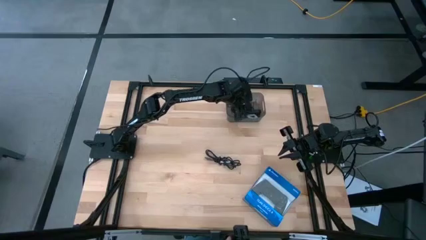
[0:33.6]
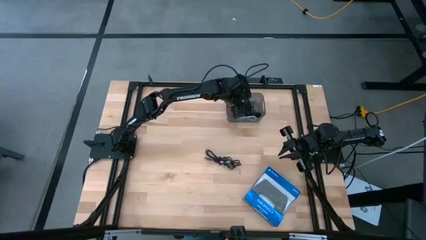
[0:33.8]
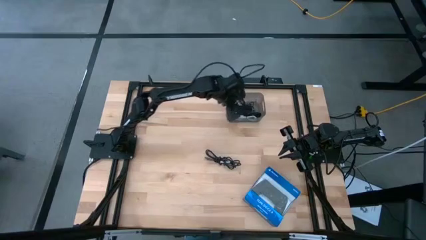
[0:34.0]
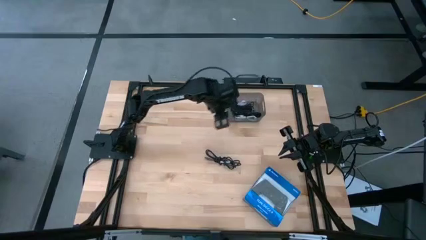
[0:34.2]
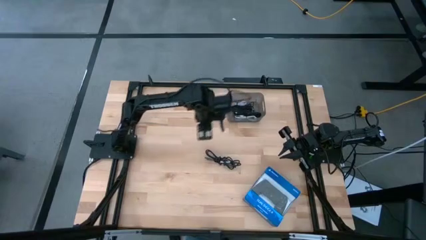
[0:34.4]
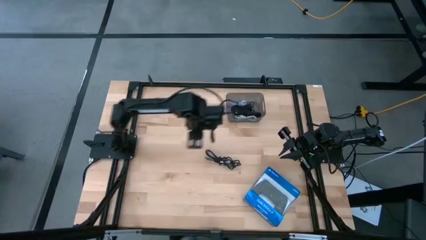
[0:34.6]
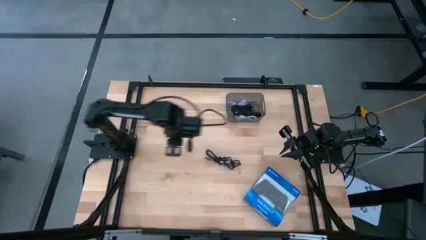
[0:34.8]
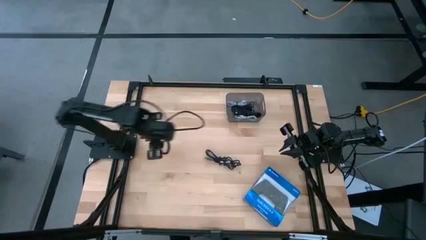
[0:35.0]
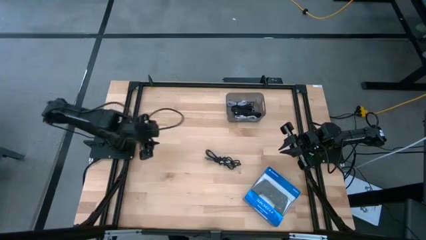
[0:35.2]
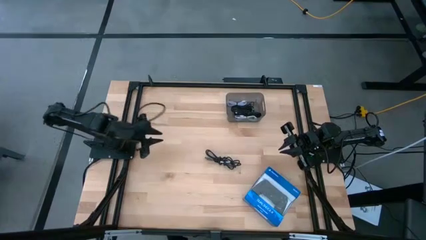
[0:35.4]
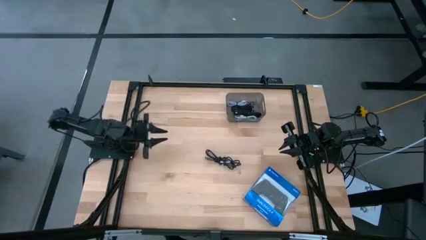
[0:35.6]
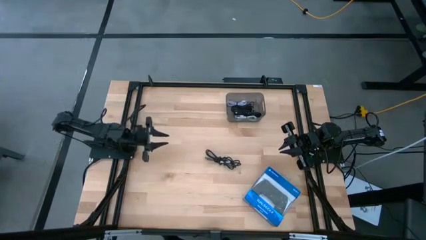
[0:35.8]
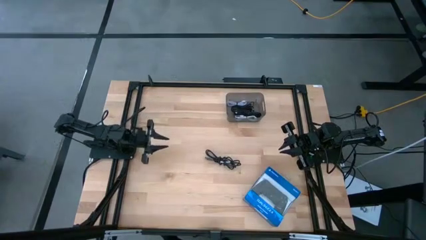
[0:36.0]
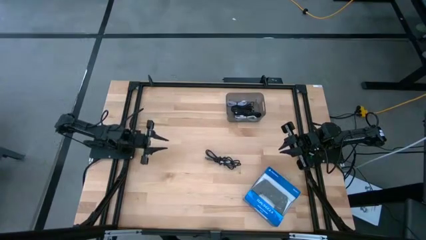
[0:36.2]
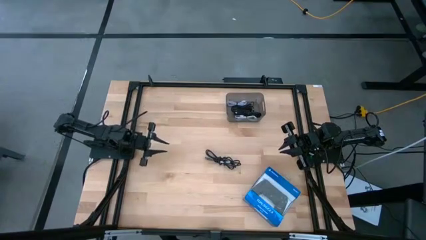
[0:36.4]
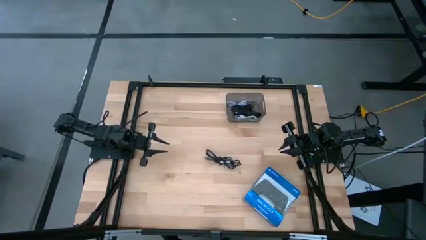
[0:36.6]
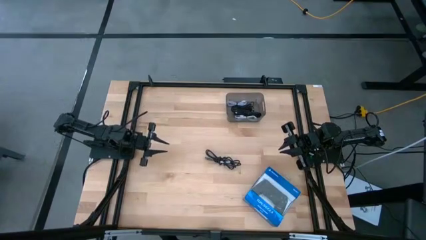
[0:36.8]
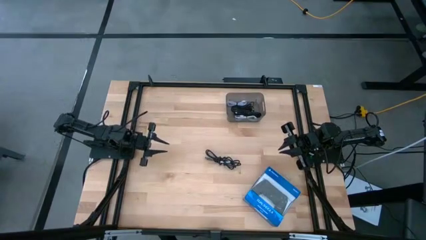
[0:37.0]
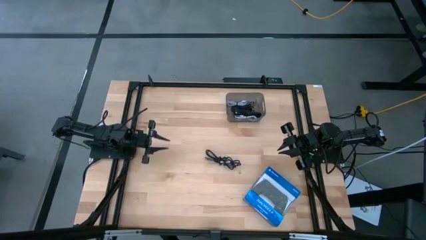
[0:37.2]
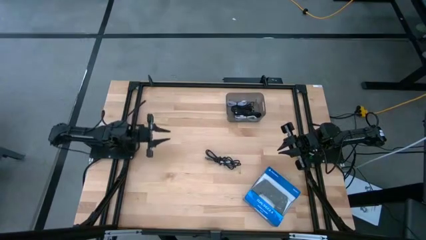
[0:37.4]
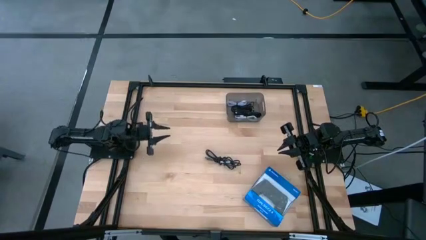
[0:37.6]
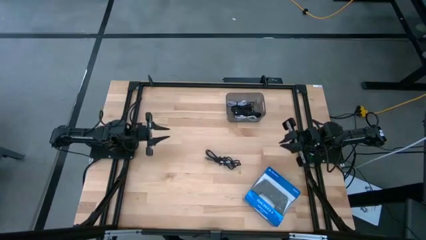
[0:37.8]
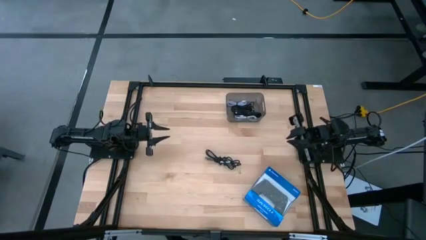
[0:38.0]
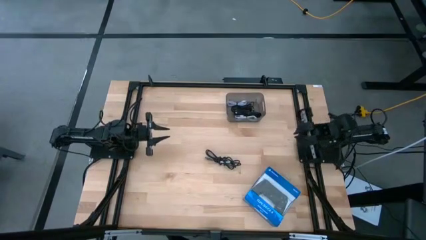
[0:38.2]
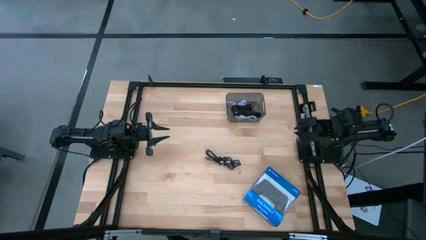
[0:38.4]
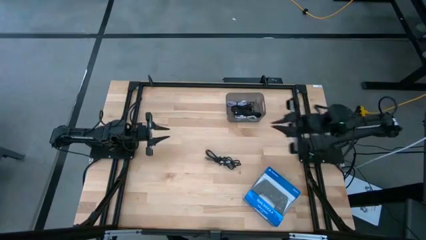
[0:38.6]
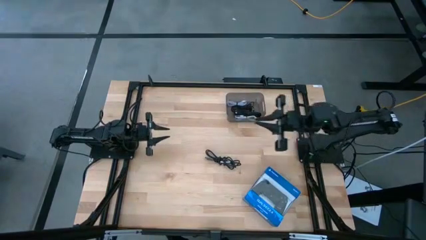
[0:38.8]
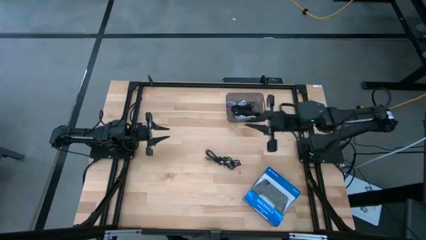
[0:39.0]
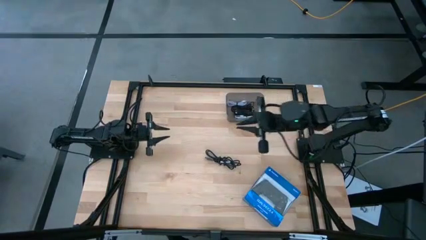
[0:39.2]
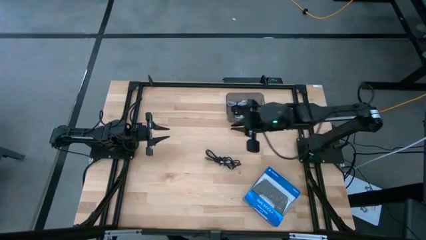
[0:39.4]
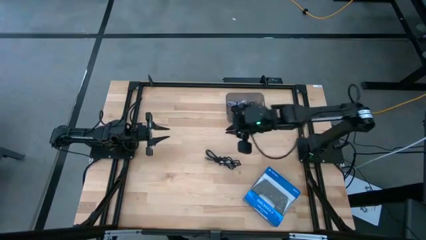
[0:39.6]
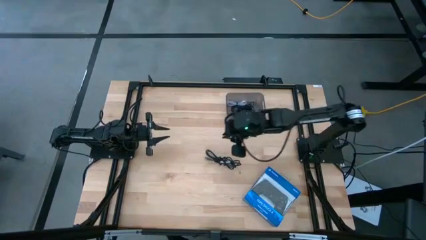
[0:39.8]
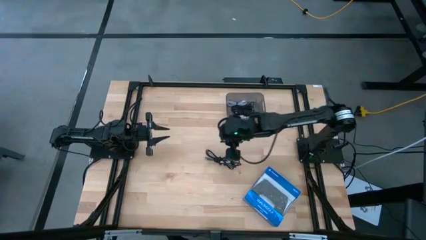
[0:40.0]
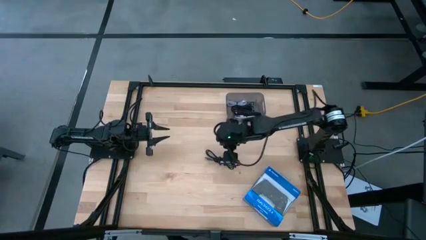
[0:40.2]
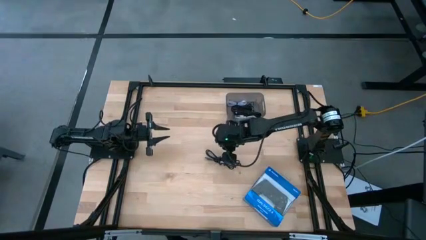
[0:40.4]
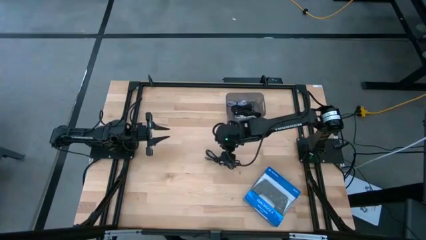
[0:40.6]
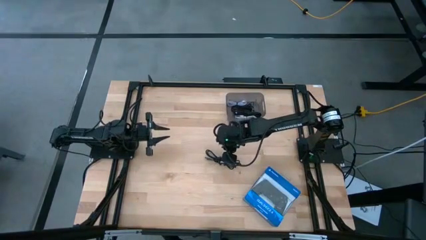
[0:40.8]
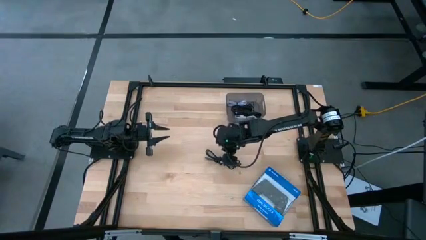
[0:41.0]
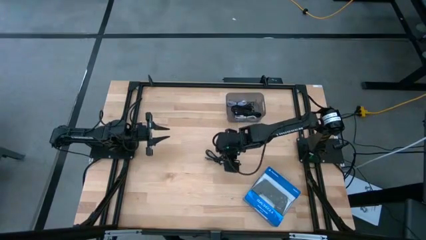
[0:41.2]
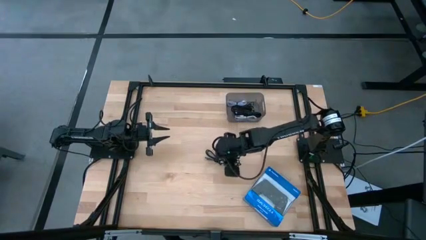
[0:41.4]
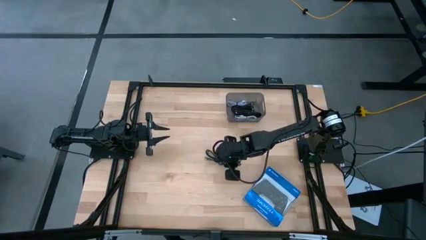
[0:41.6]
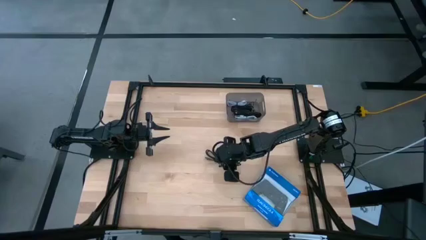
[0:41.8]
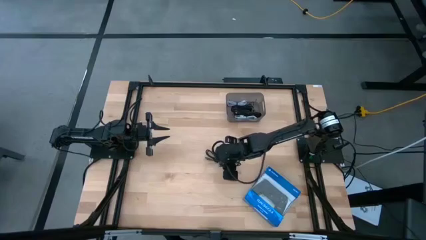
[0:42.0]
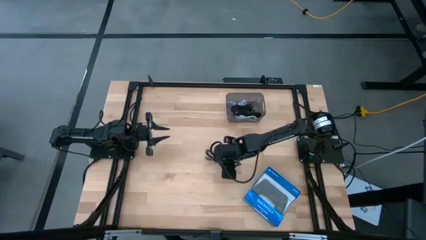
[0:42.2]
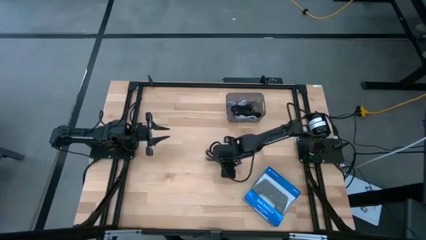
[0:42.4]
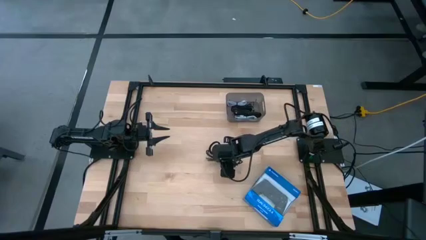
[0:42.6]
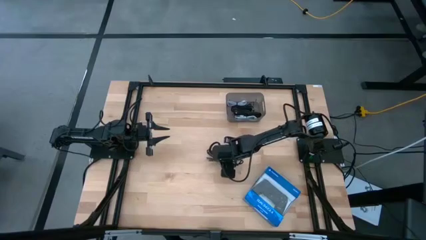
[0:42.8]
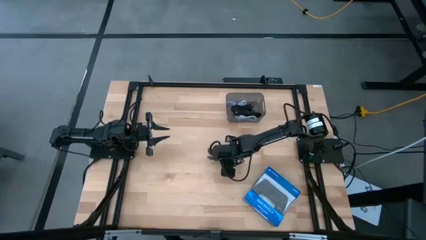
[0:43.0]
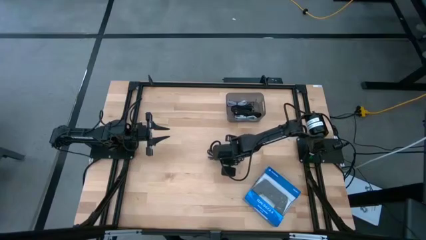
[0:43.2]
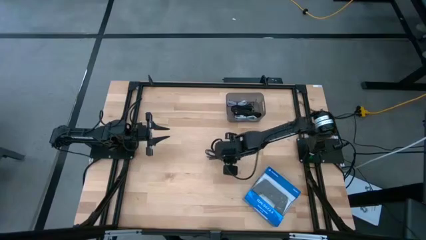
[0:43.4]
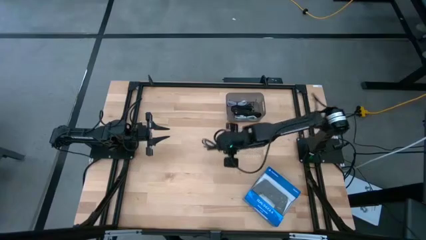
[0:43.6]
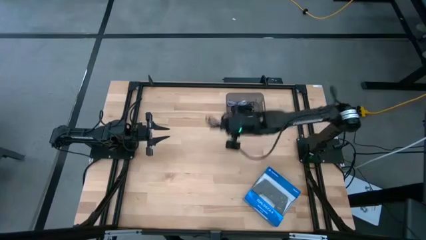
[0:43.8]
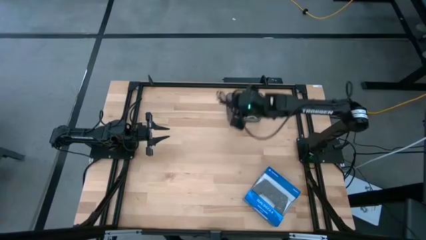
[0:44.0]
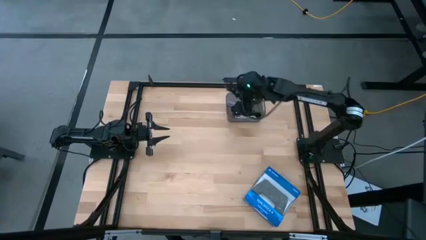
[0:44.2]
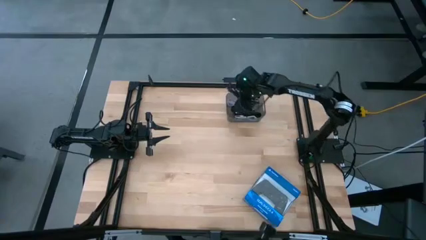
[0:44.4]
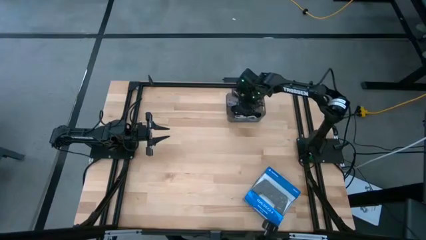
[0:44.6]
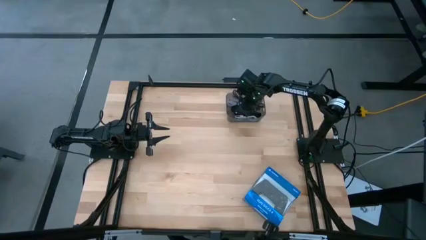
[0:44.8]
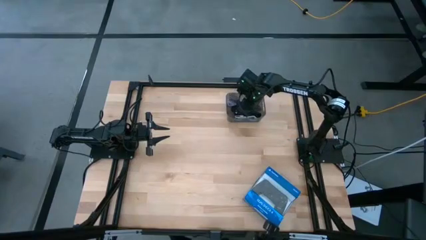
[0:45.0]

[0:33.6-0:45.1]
Task: Pick and place USB-C Cables
Put the black charger cable into the black bin

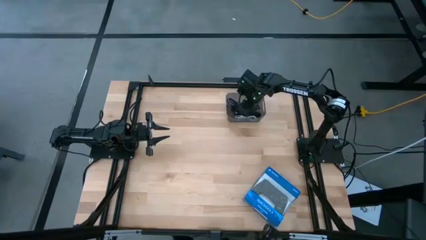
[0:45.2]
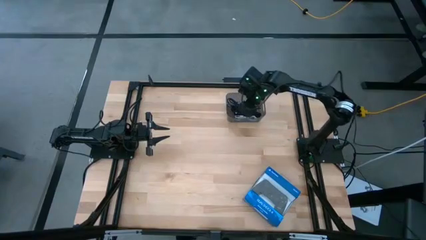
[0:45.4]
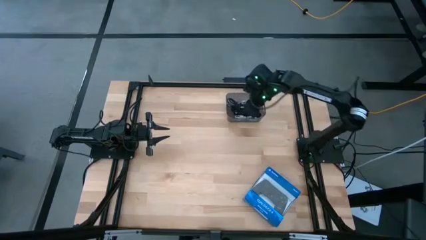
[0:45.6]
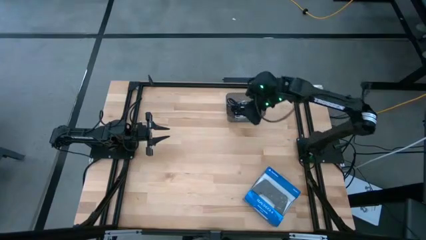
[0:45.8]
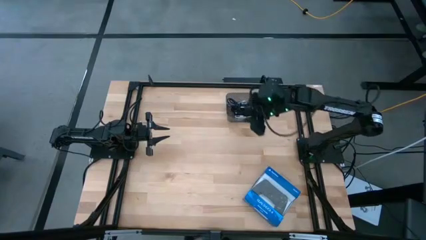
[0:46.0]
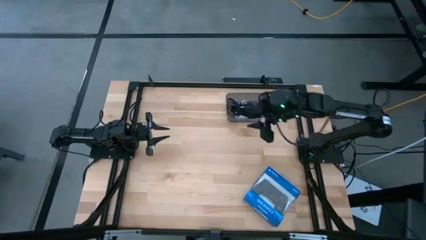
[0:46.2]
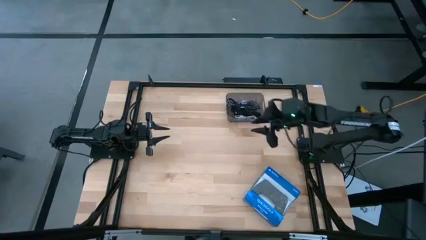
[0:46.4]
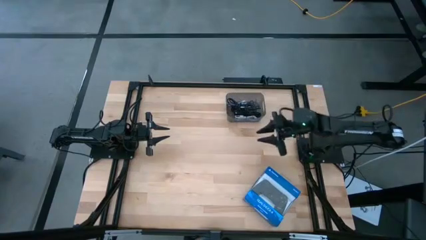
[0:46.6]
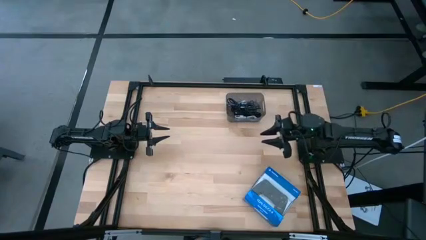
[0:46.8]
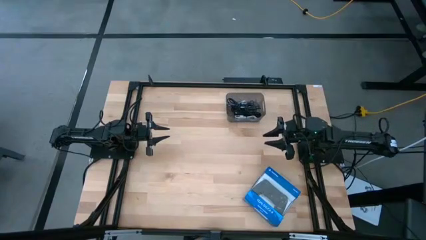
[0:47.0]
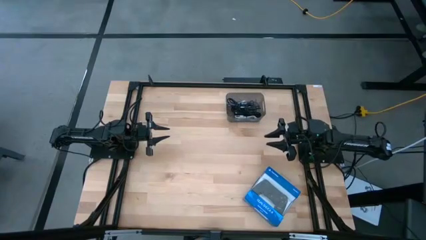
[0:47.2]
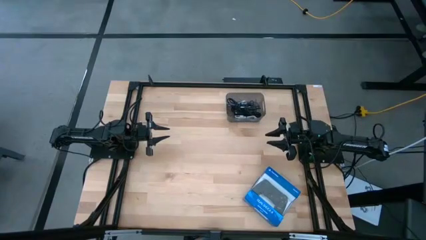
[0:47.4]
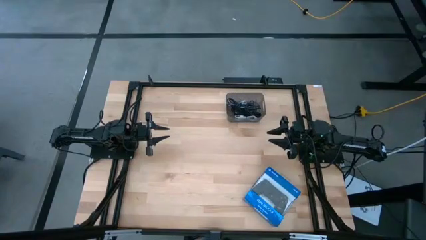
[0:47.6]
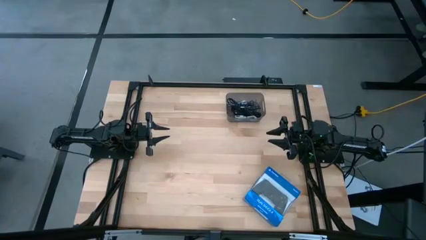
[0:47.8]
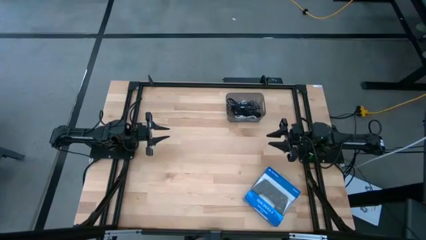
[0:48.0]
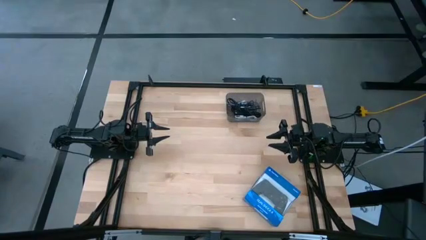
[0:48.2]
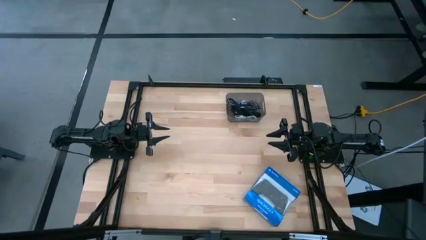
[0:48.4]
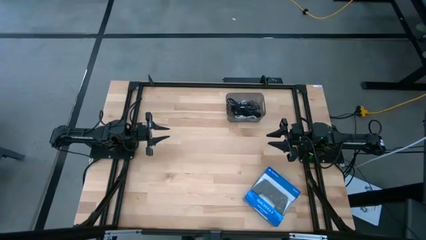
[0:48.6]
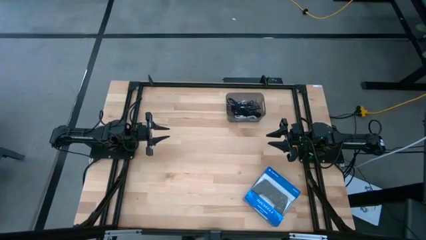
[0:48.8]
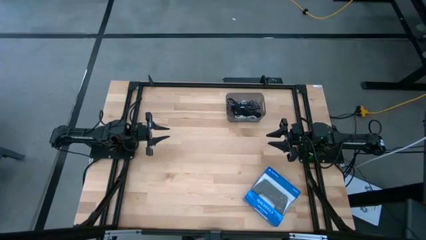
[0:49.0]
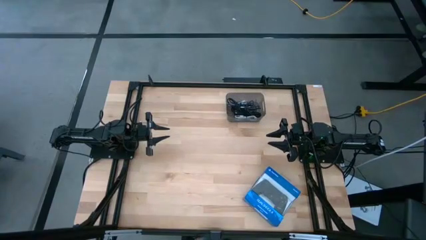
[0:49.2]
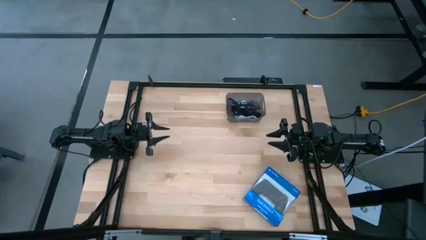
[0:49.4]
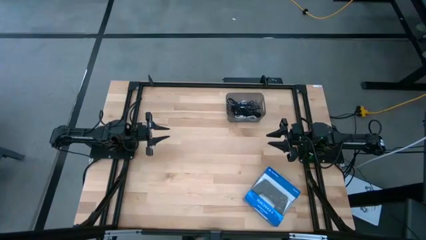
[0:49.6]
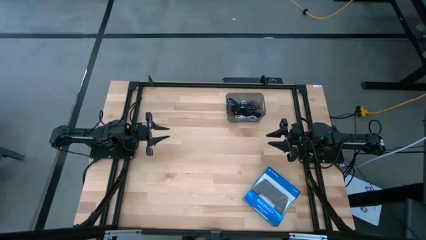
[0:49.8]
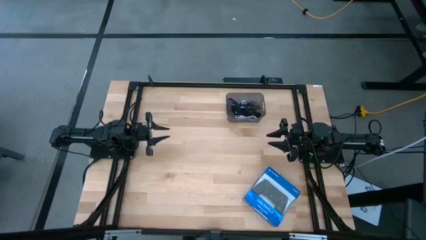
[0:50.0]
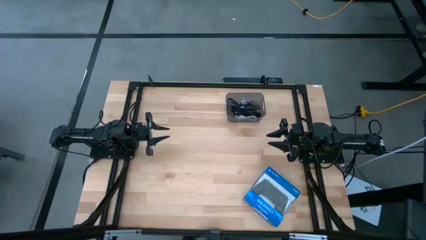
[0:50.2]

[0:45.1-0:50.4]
Return to Home Position
